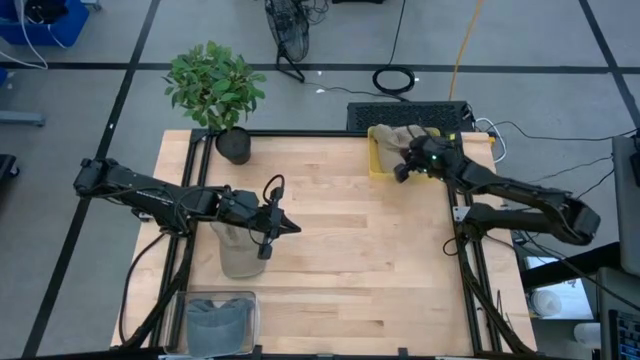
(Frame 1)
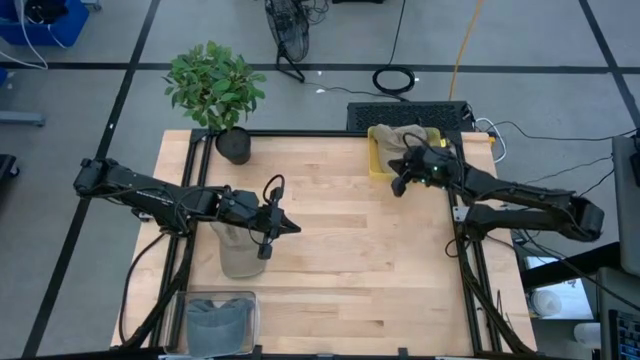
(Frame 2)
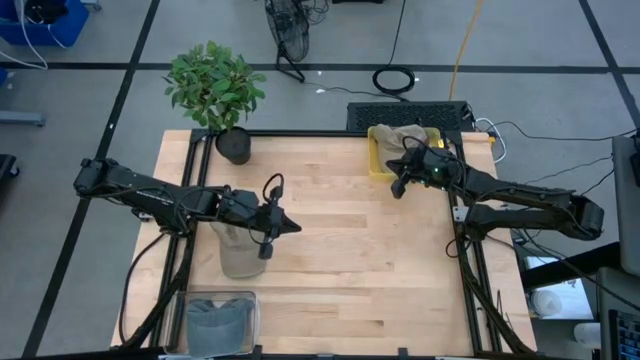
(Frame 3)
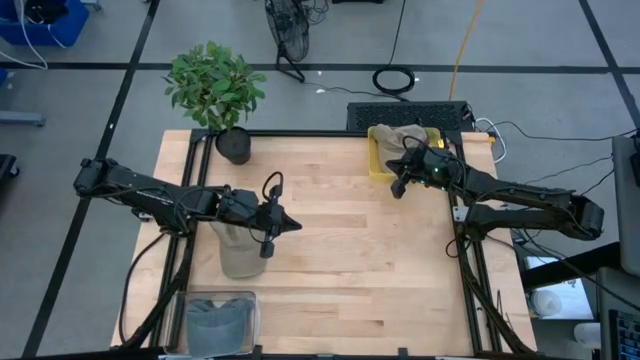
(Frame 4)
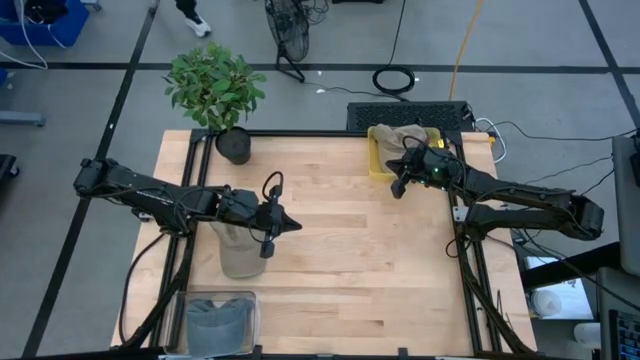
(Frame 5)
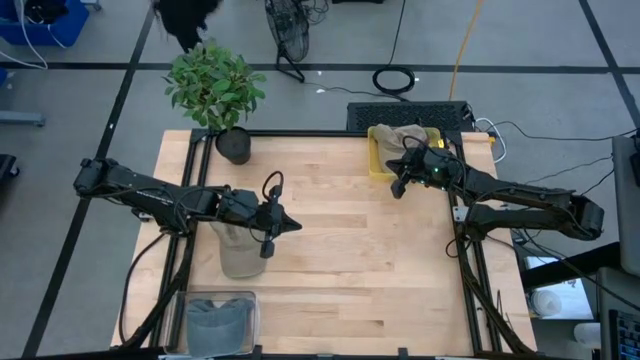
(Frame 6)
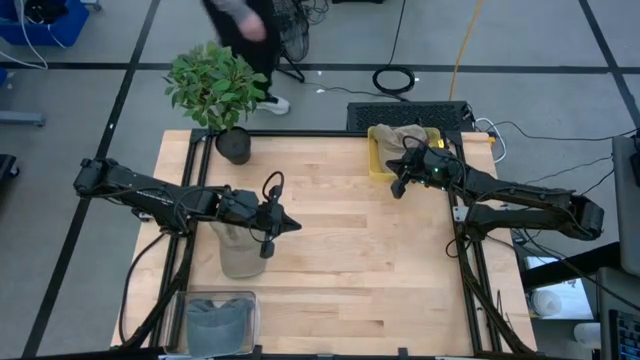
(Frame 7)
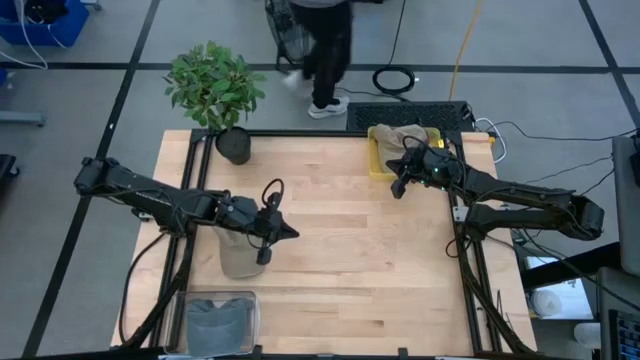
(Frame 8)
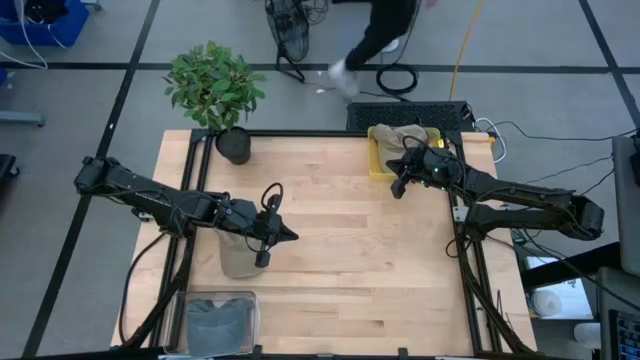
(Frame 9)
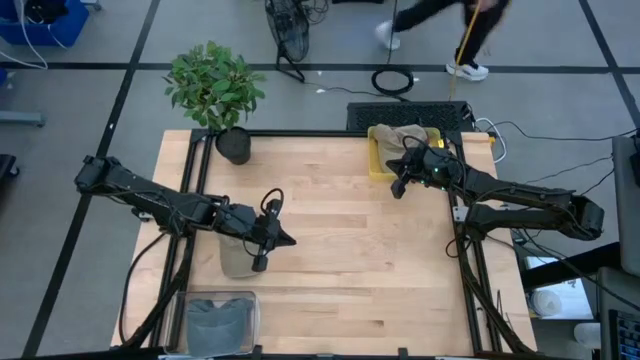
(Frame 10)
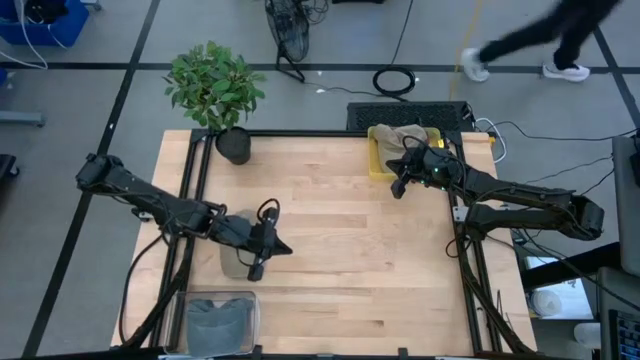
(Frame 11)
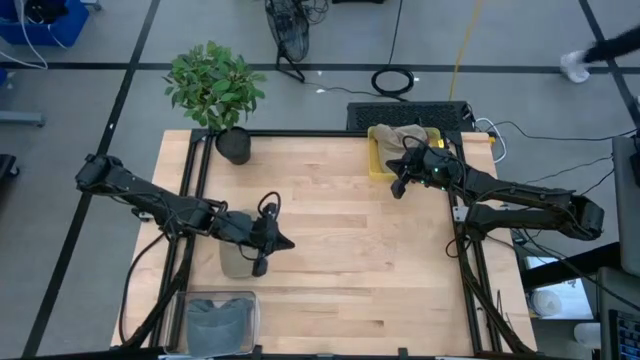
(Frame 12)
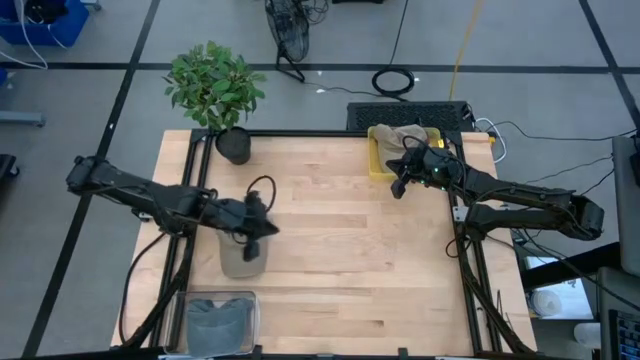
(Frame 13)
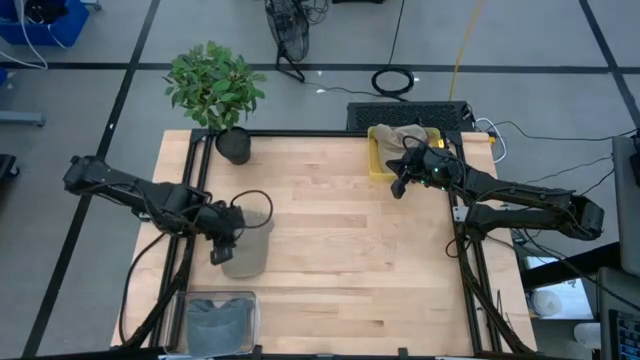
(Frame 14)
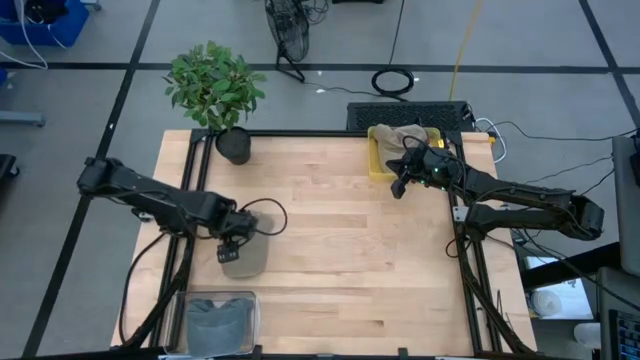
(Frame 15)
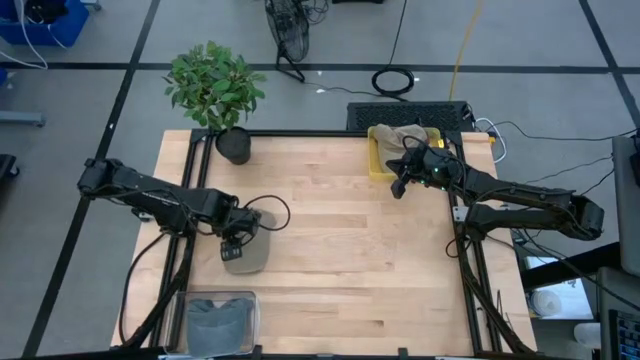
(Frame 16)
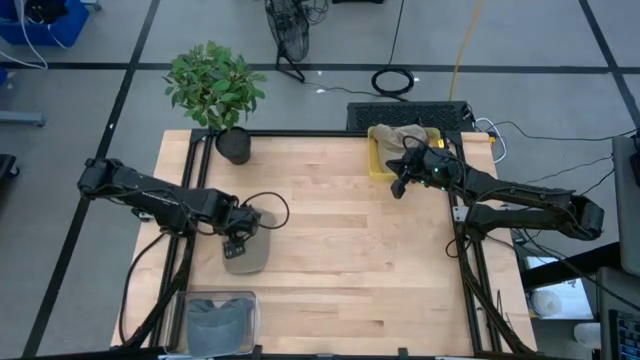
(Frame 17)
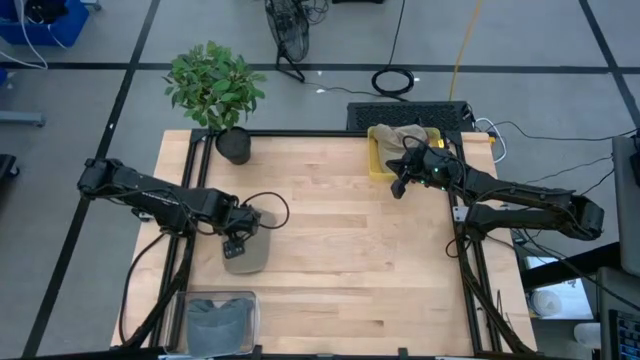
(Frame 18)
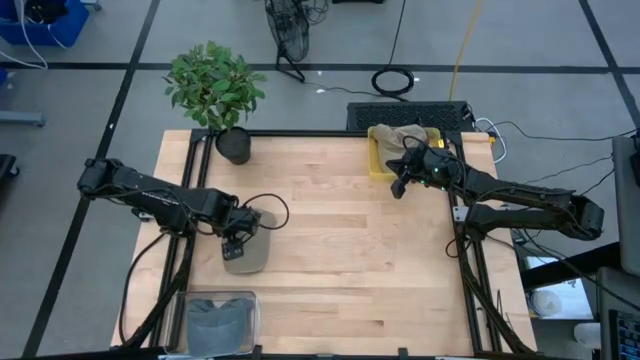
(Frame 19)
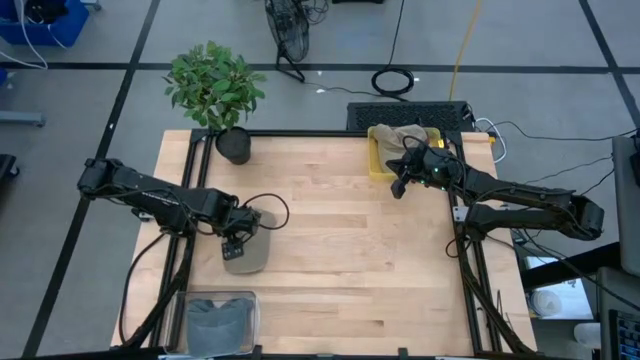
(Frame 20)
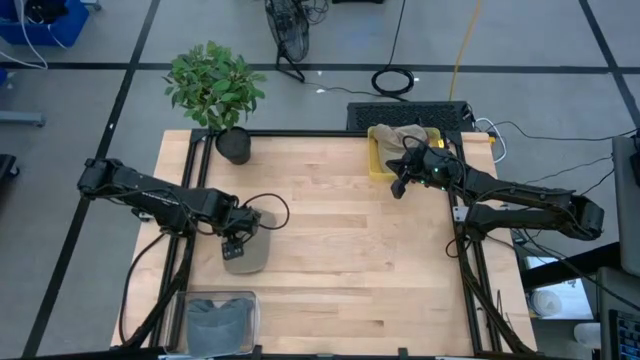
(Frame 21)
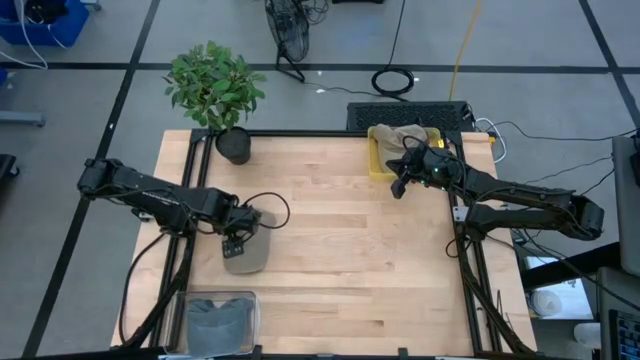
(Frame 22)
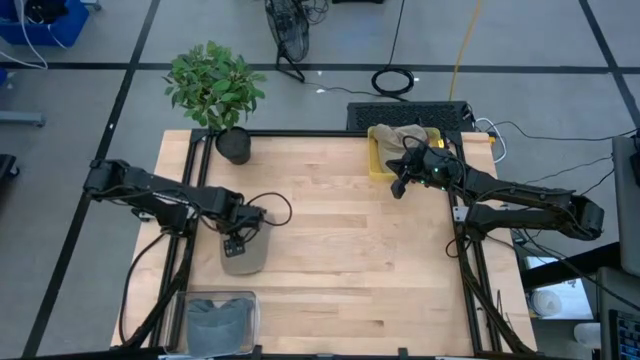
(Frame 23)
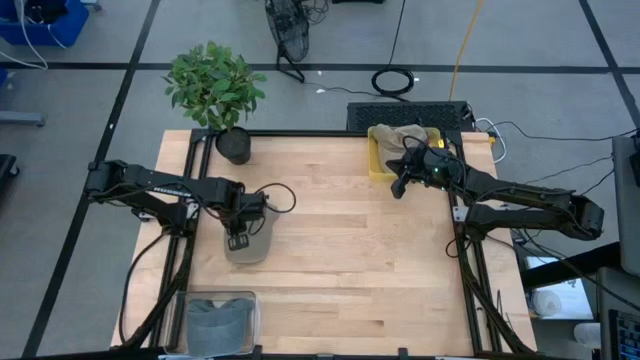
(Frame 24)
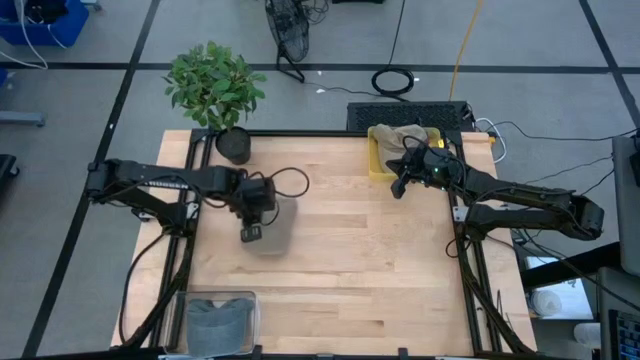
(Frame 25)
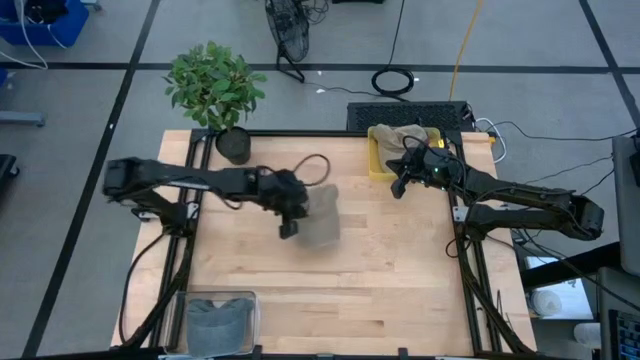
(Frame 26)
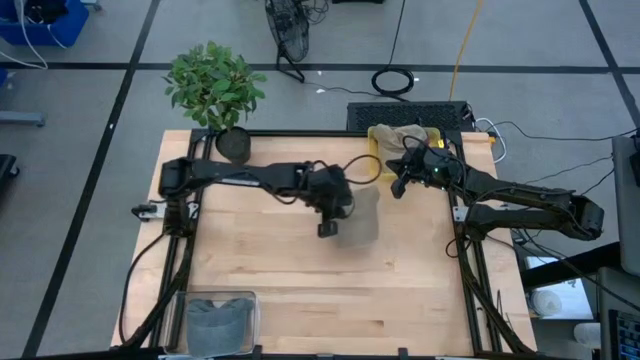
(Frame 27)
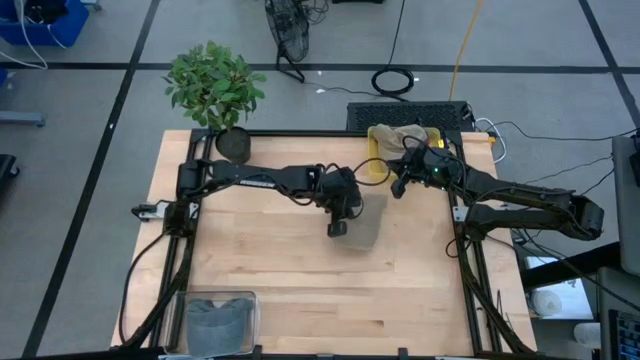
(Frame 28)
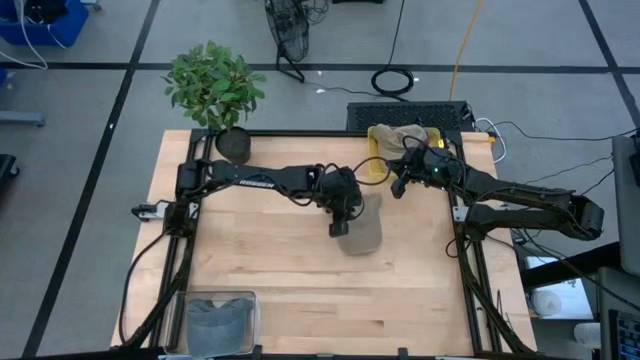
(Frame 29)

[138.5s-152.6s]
Task: Pick & Place hat
Put the brown cap into the yellow bin

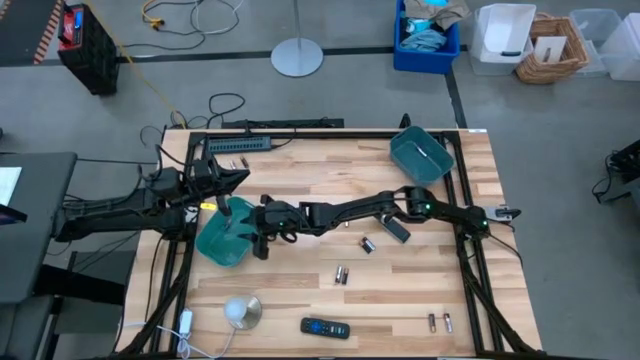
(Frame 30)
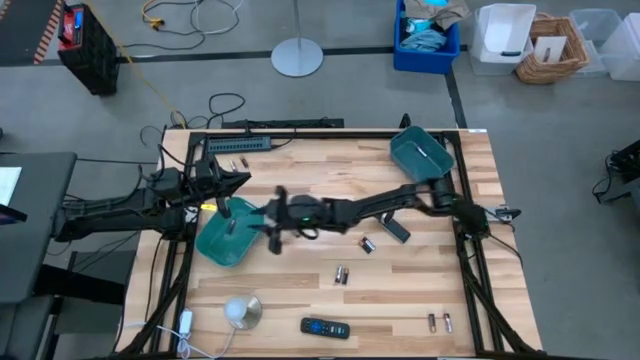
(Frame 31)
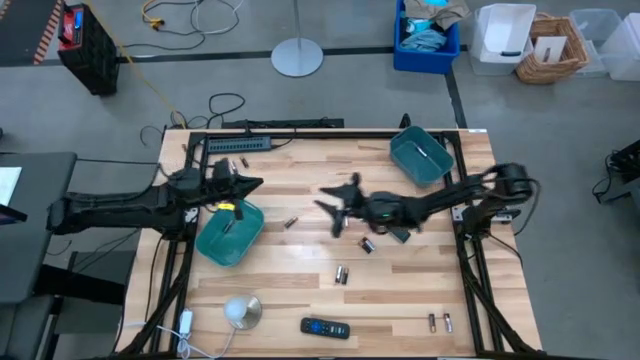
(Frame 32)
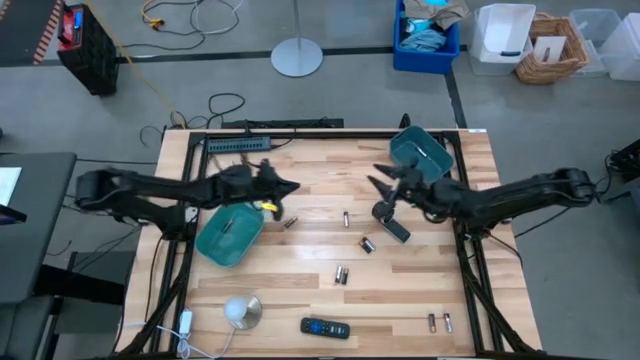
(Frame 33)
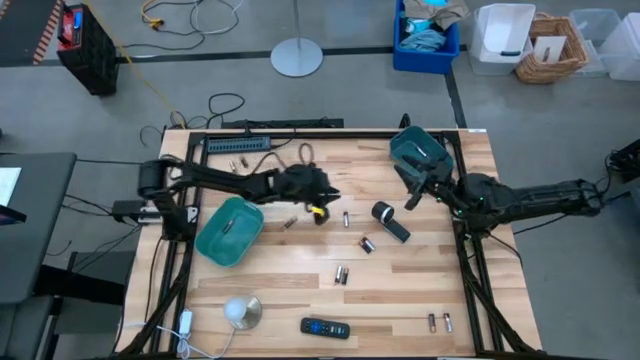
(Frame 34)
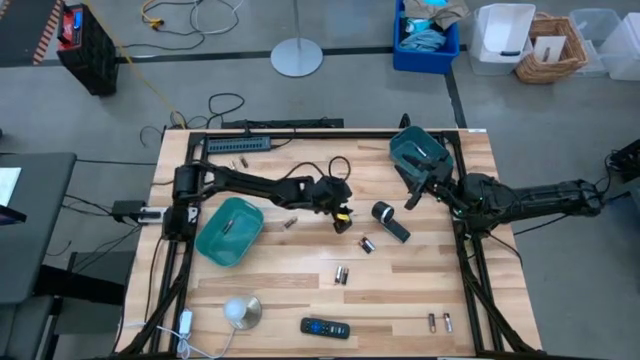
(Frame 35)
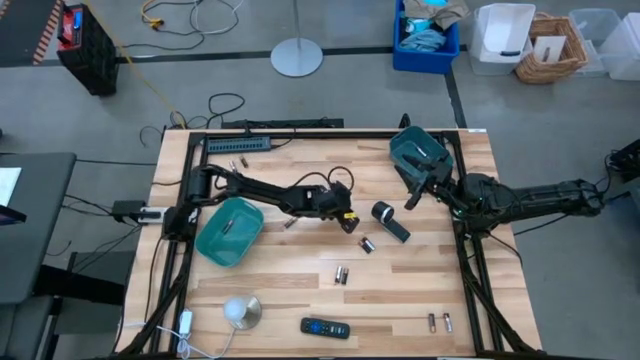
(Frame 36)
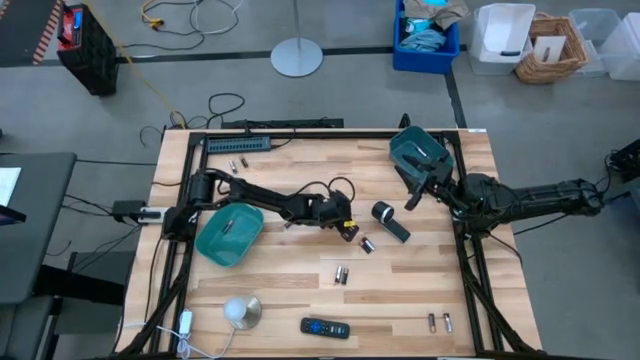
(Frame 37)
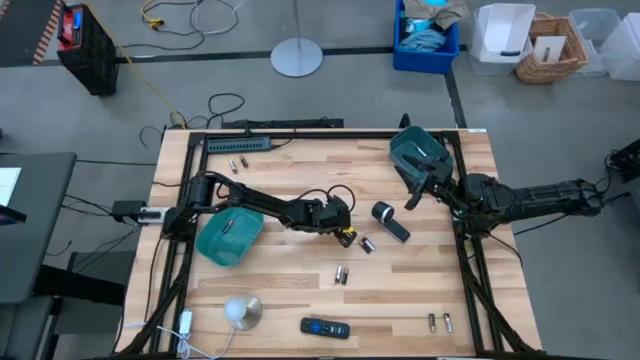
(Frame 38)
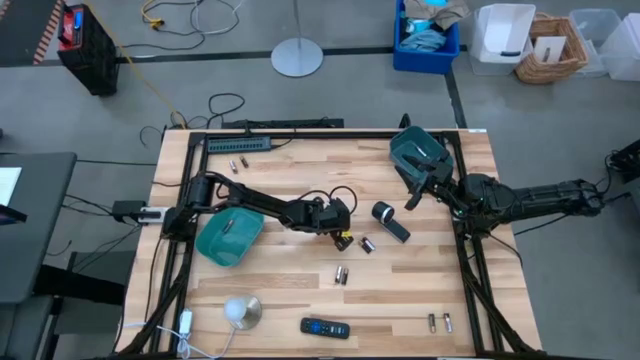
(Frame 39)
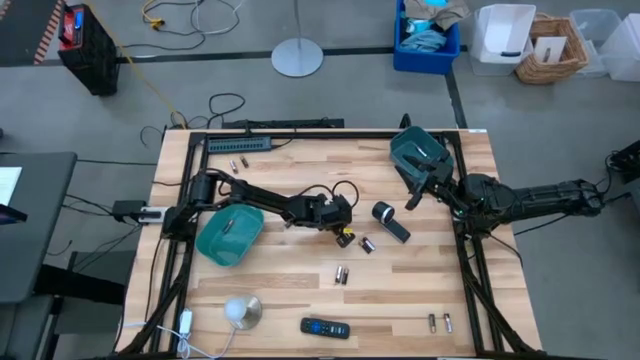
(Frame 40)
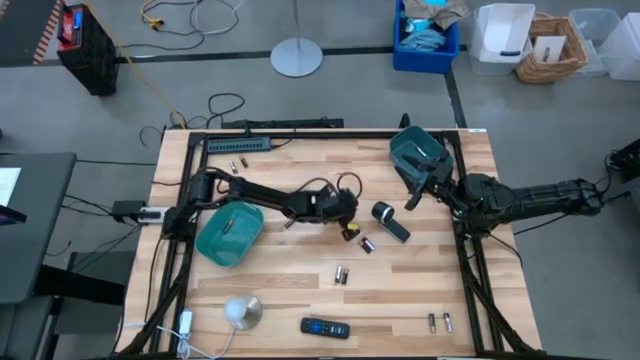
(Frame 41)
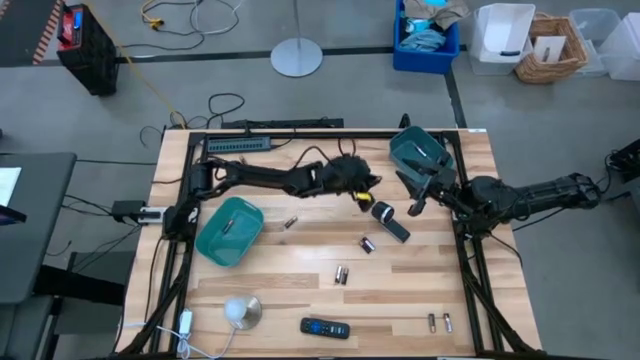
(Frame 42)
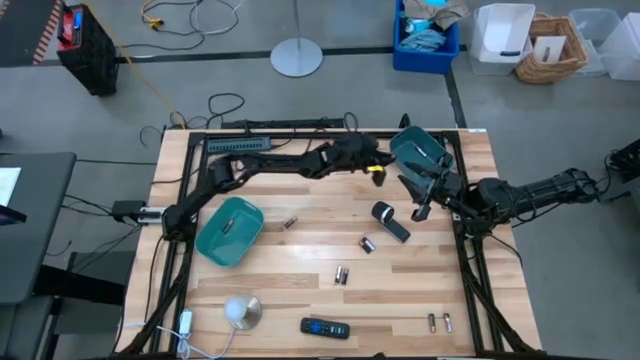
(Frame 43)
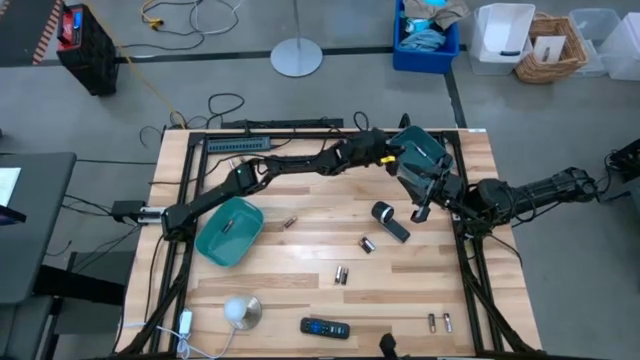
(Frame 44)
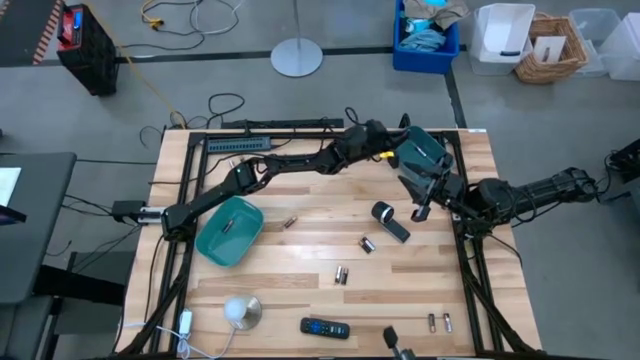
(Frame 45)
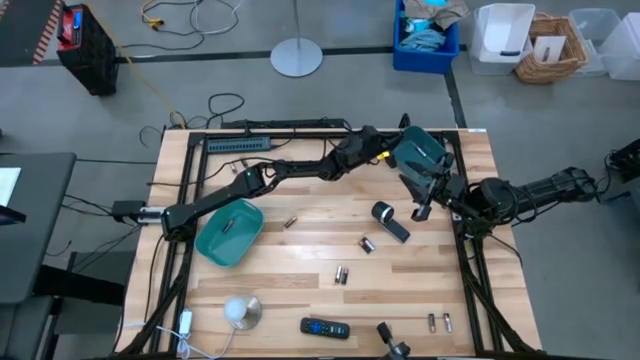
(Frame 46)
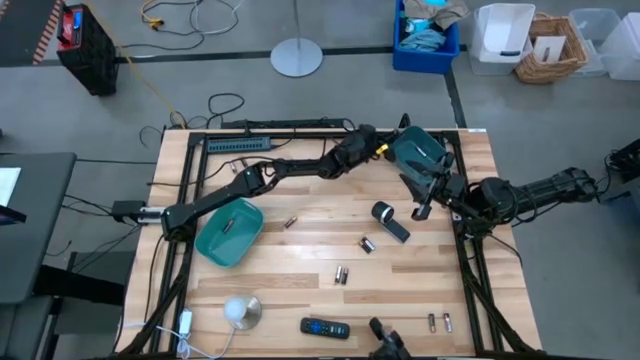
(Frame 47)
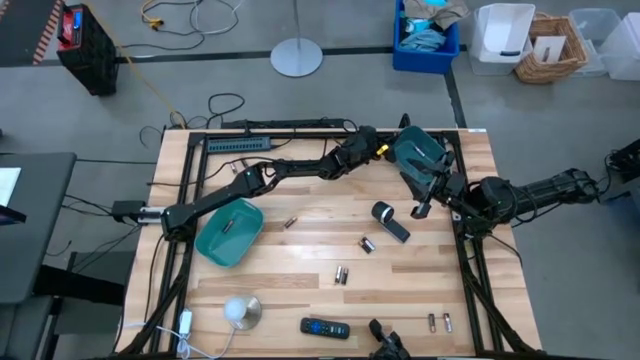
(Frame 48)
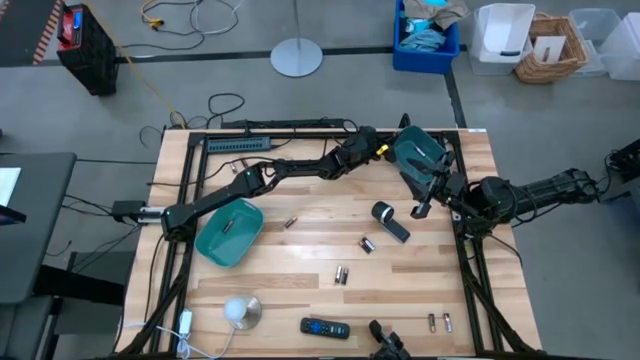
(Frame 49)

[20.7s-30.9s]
Task: Sort batteries
Put the silver battery into the blue bin
